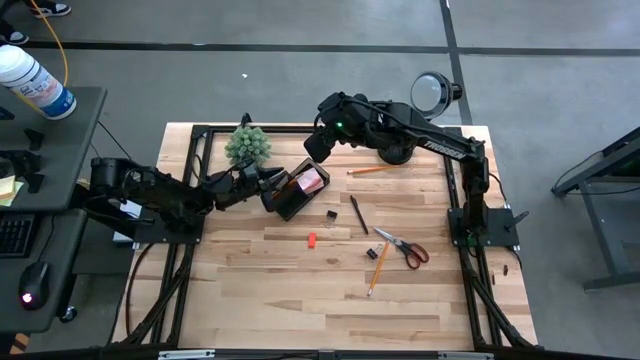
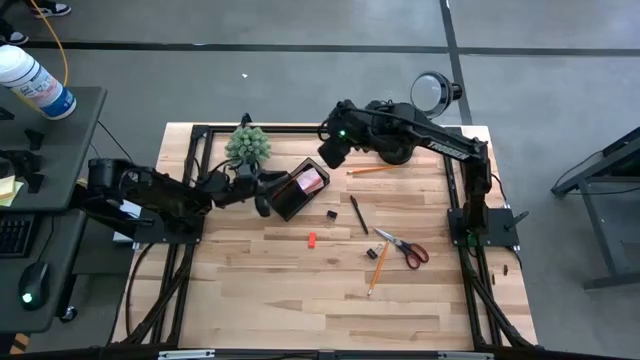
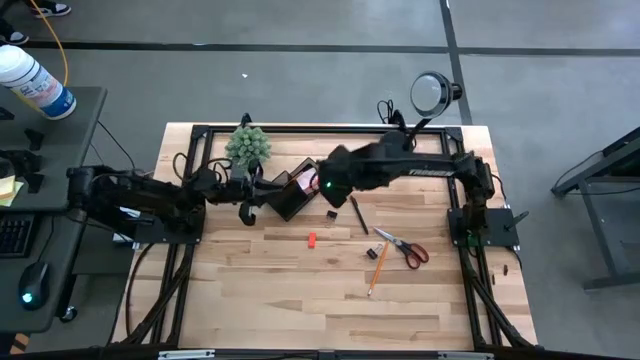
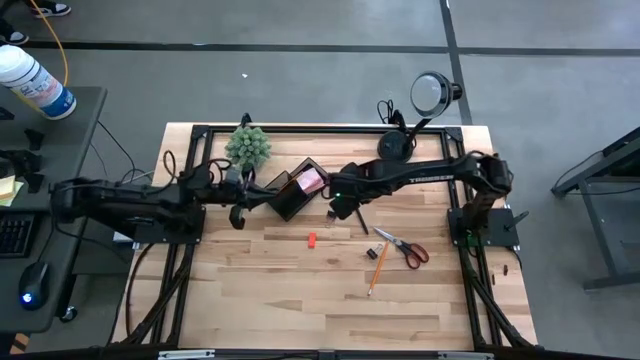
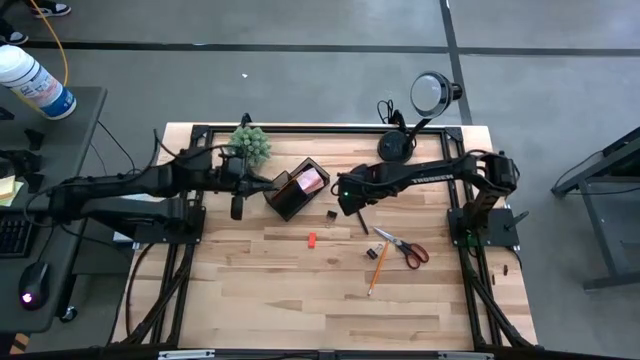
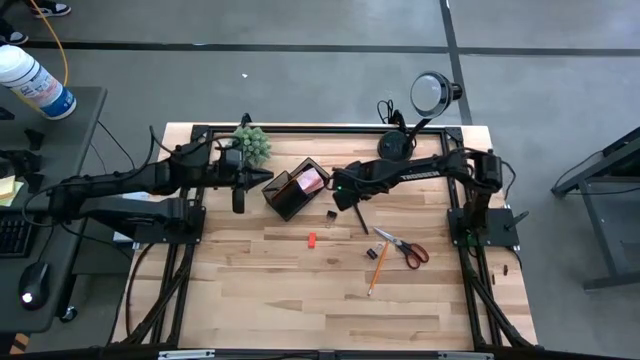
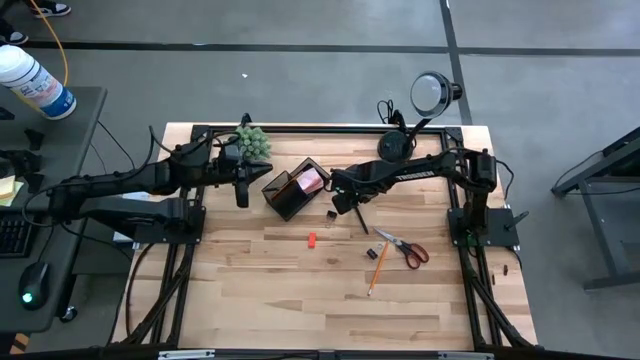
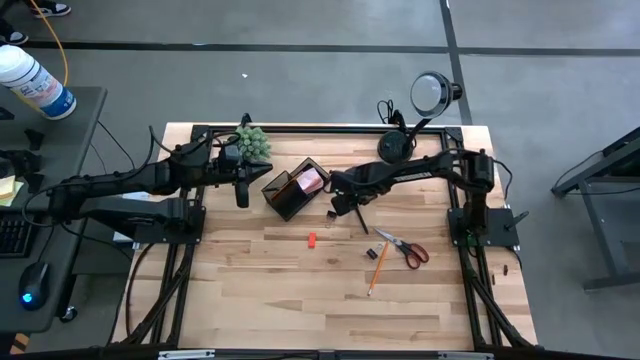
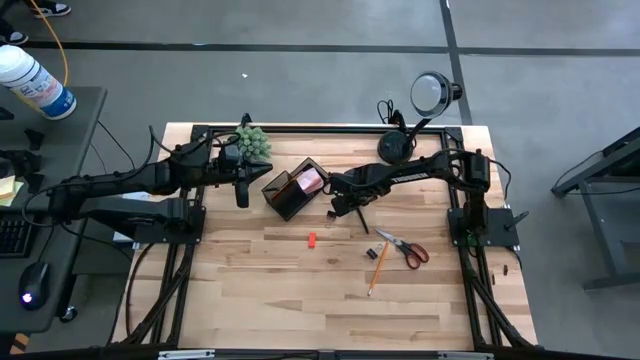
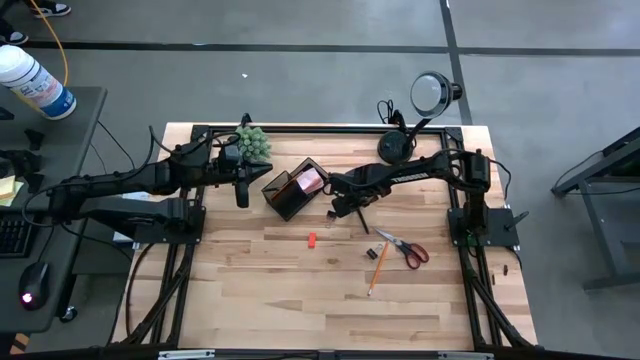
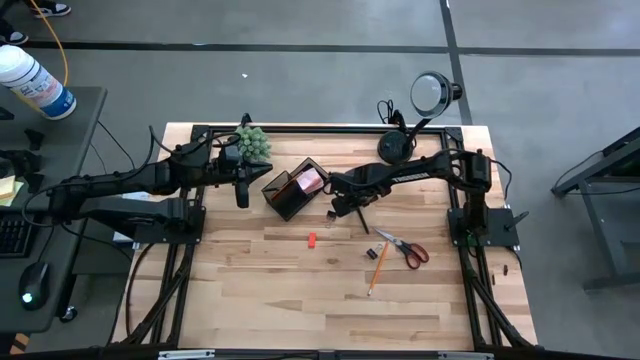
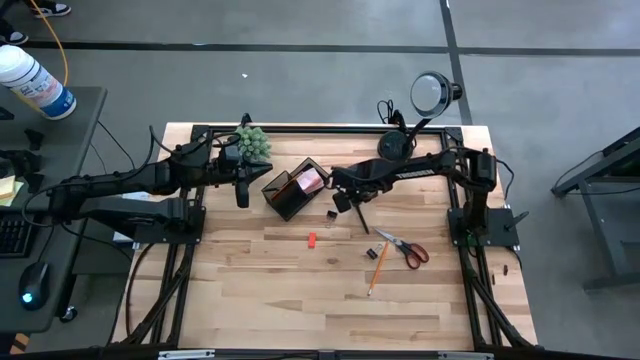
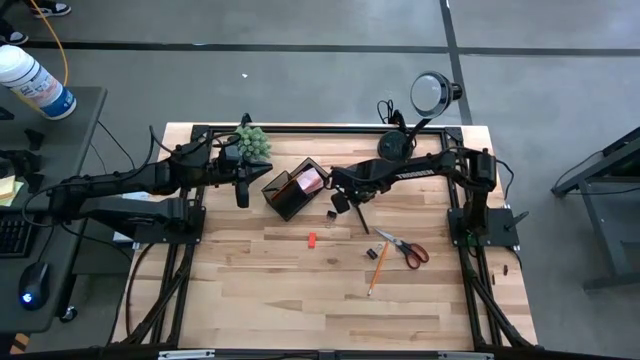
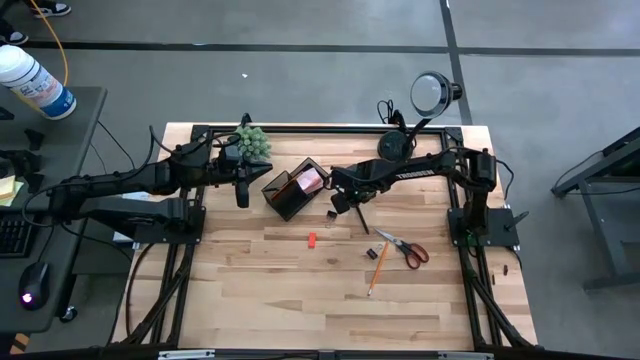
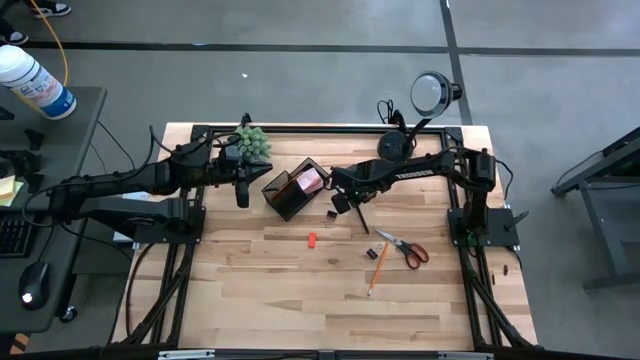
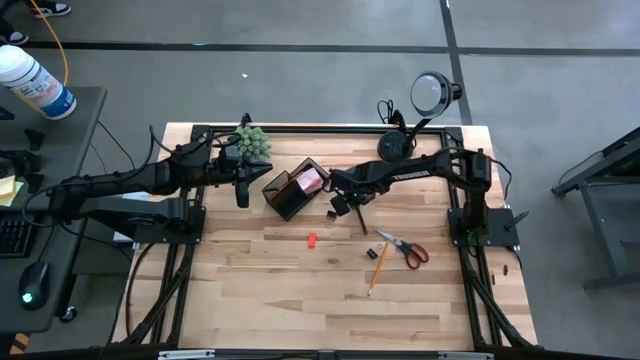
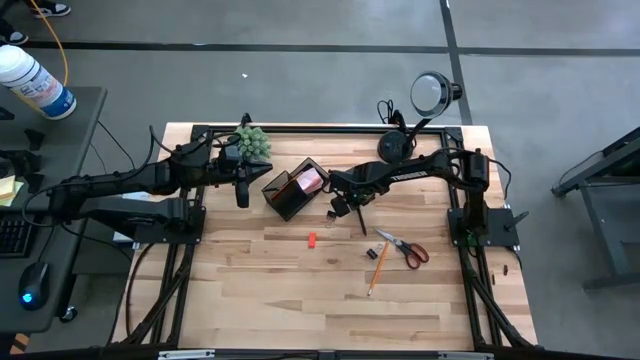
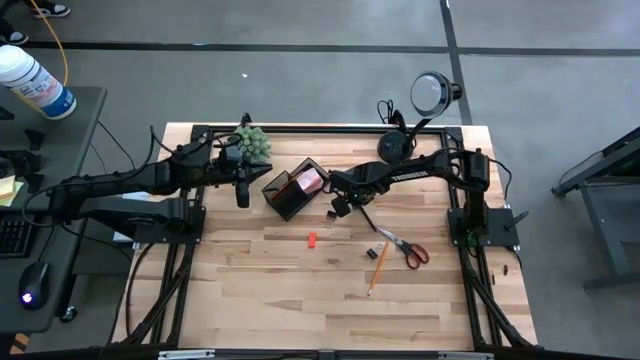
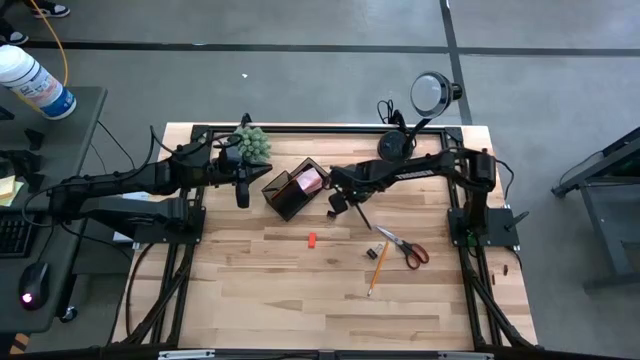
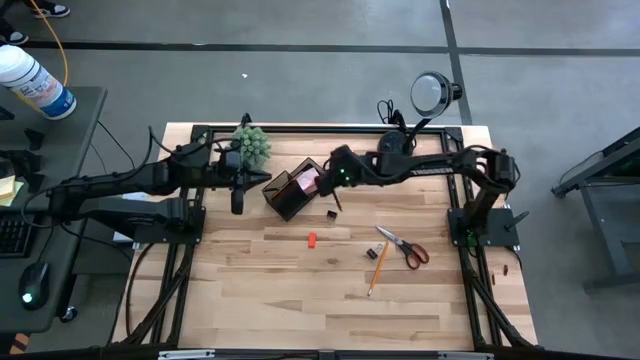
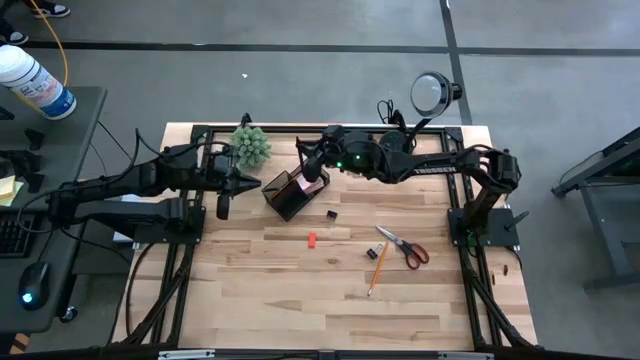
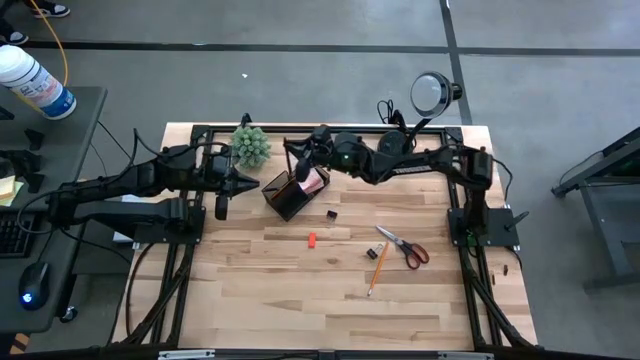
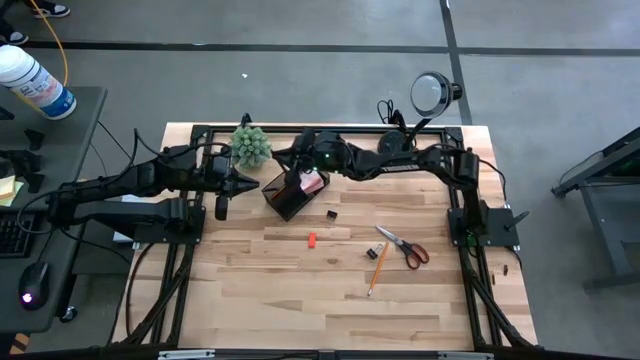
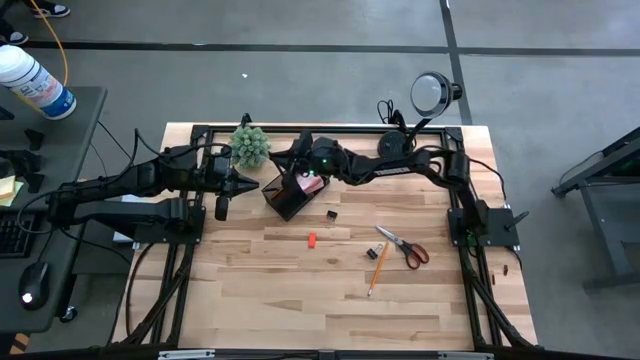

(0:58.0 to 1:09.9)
Task: Pick and place office supplies into organizer
Put the black pen into the black desk organizer

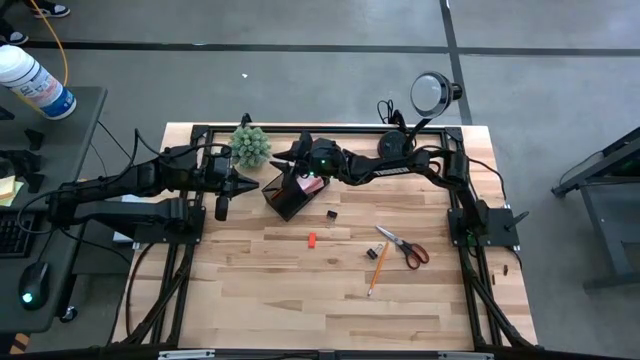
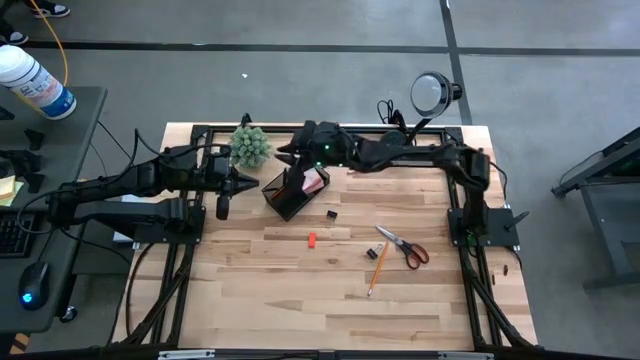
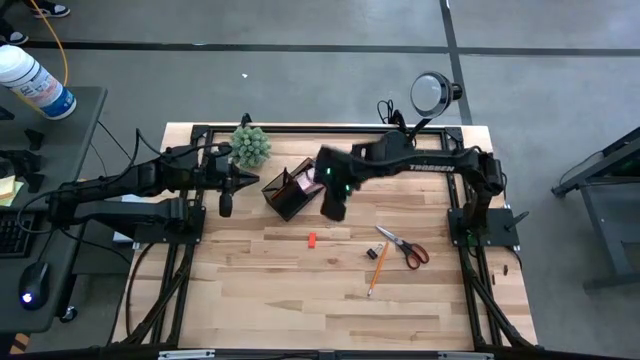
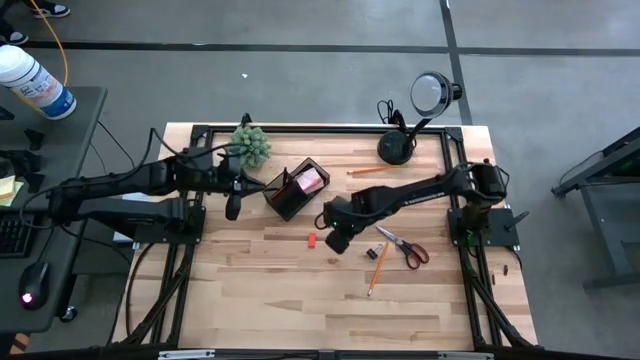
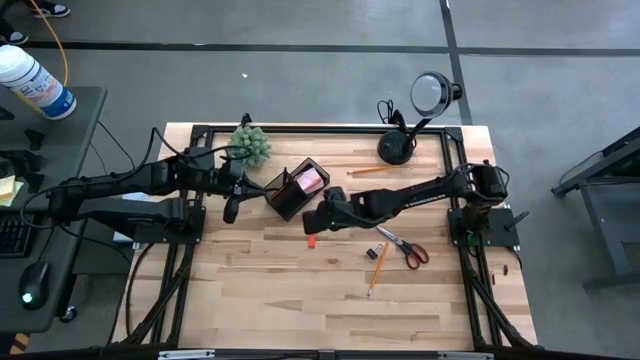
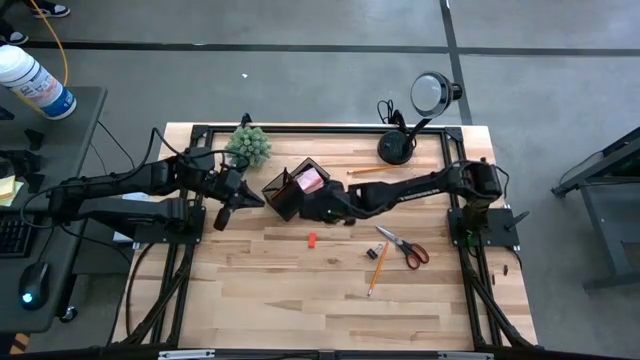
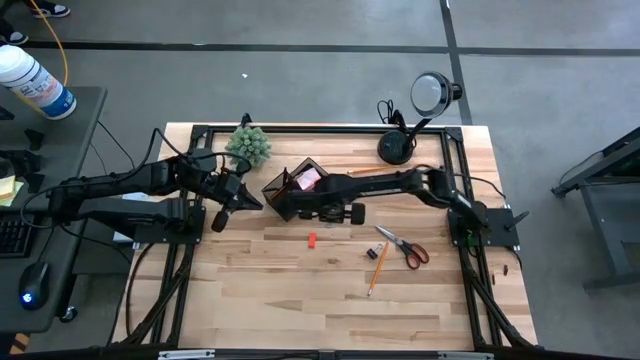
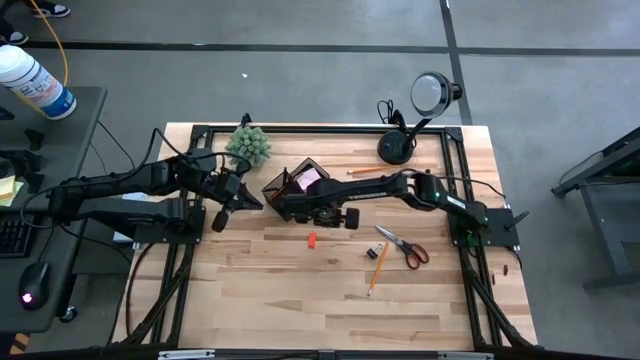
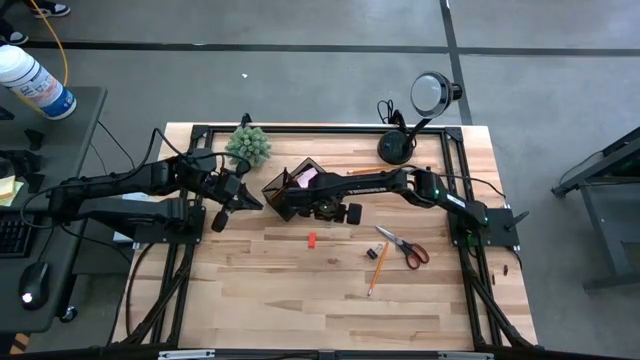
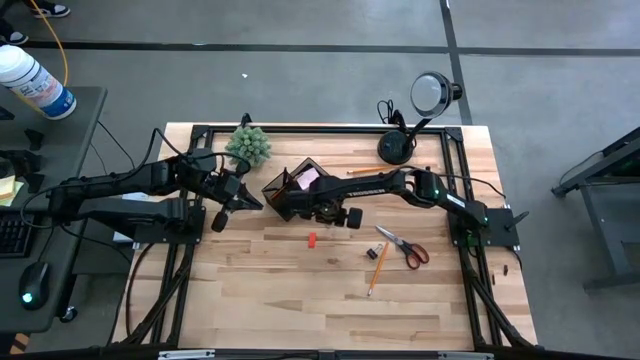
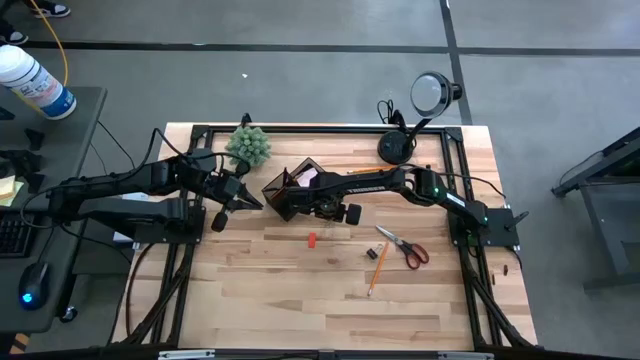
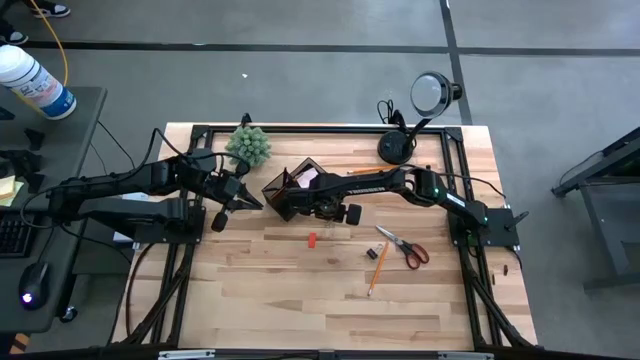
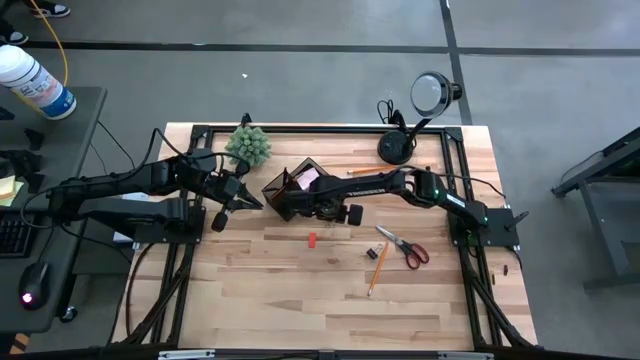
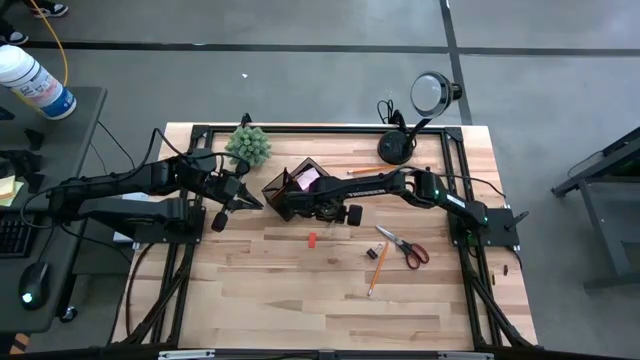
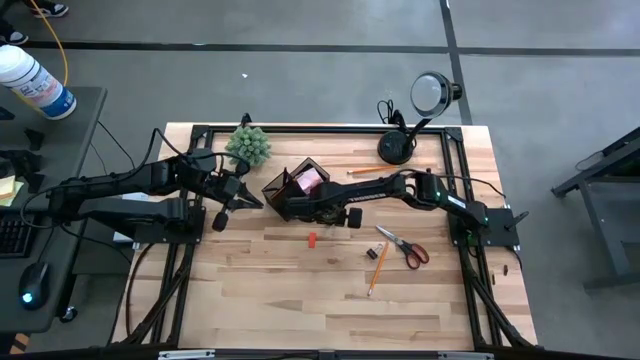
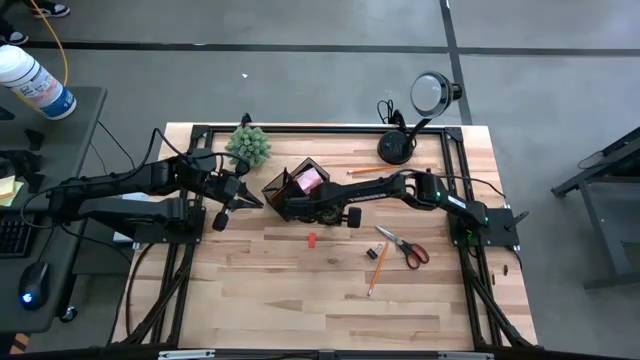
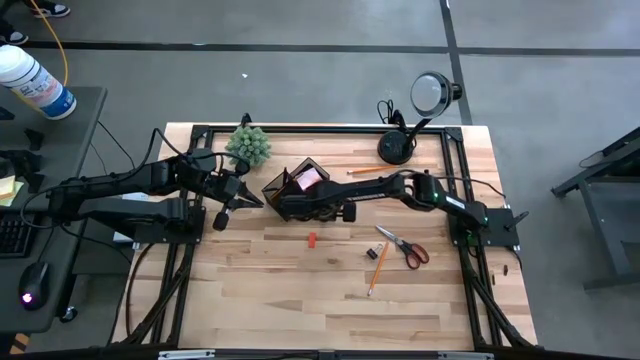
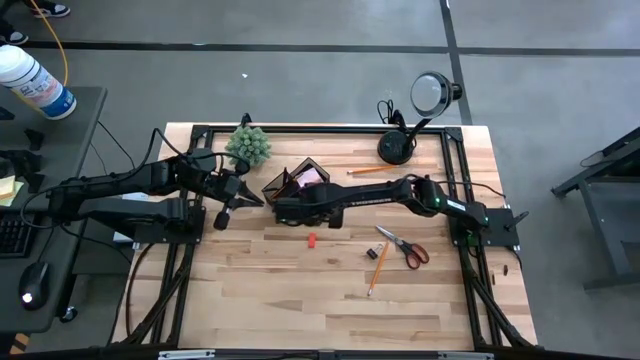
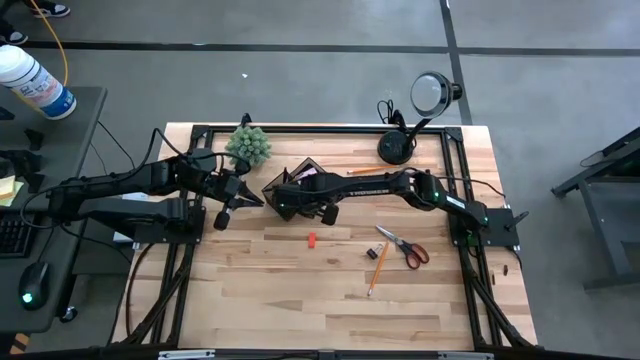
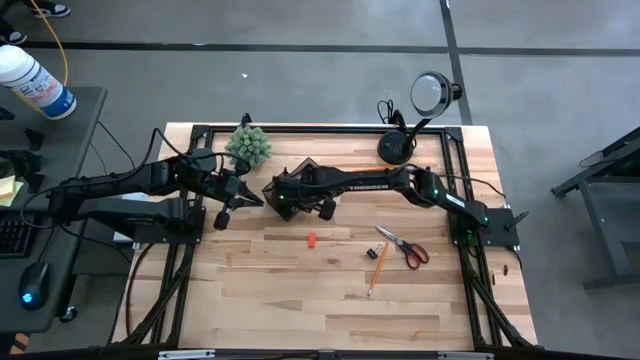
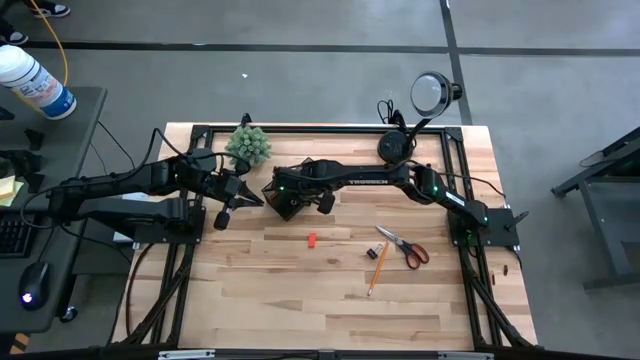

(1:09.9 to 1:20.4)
Put the left black binder clip into the black desk organizer
